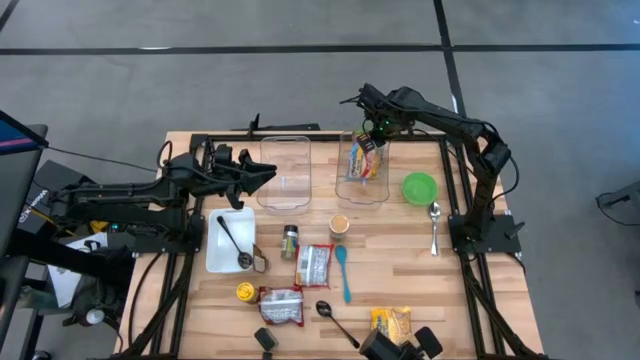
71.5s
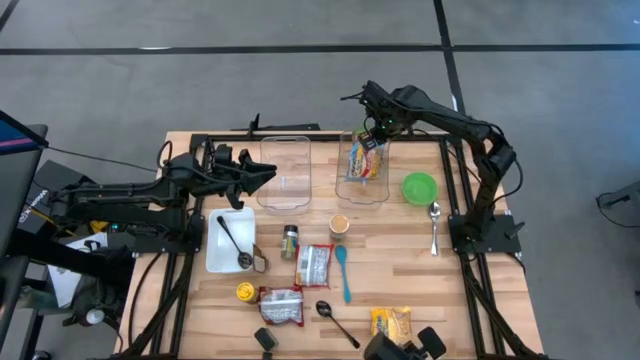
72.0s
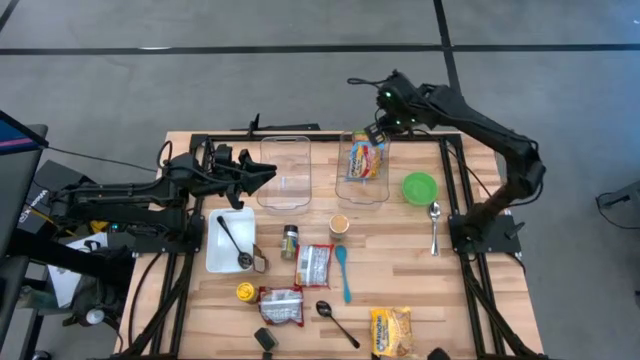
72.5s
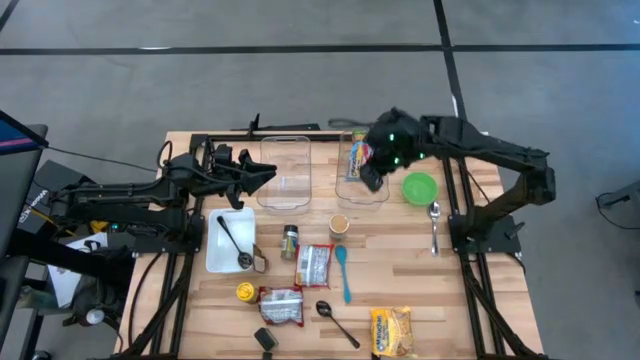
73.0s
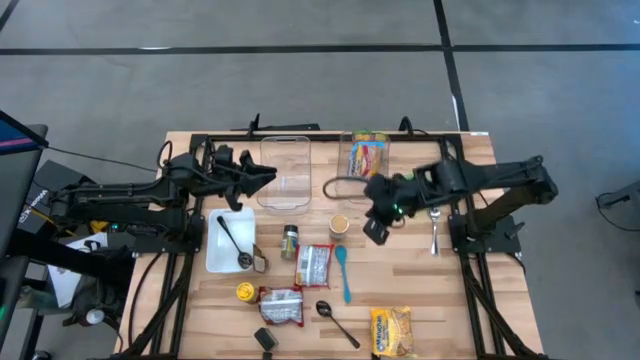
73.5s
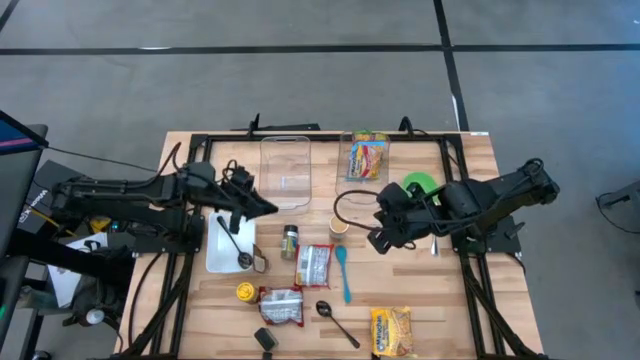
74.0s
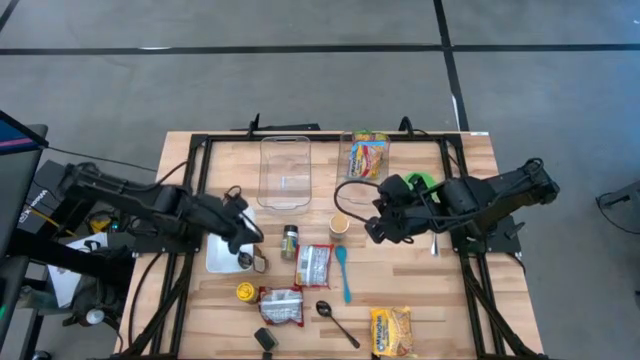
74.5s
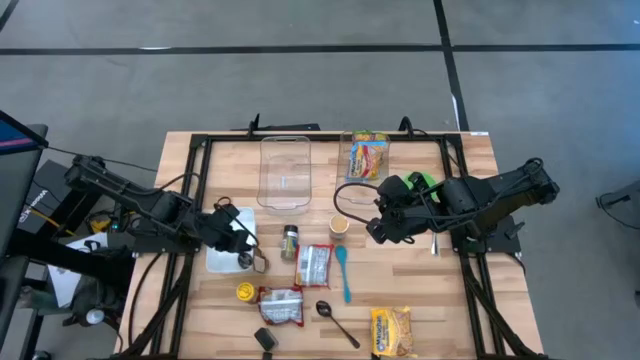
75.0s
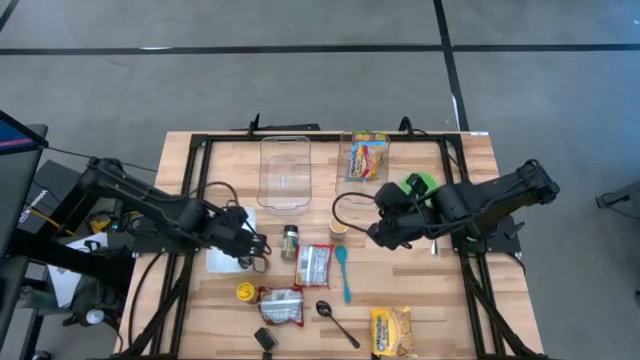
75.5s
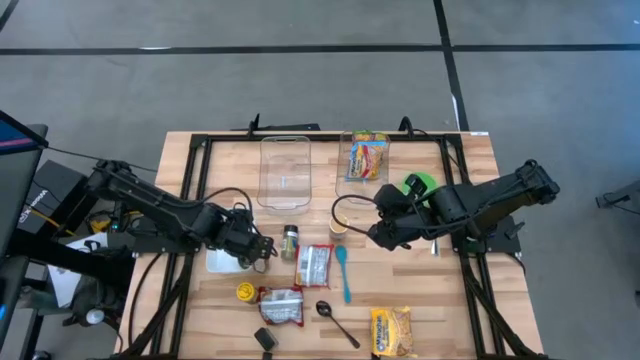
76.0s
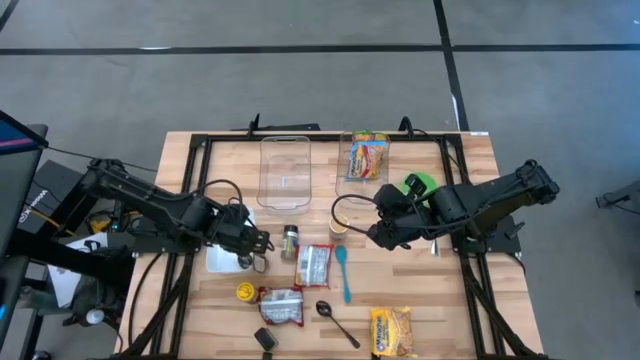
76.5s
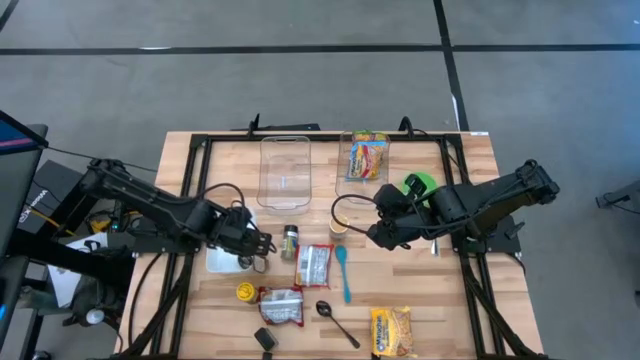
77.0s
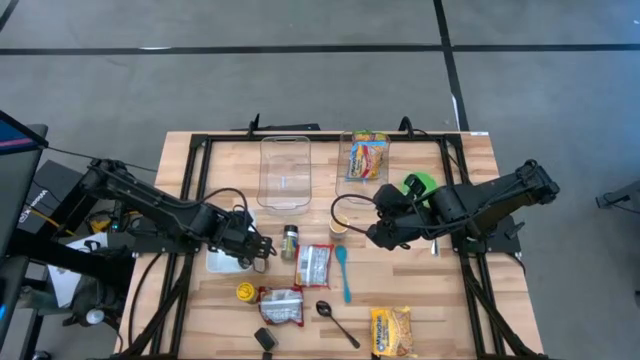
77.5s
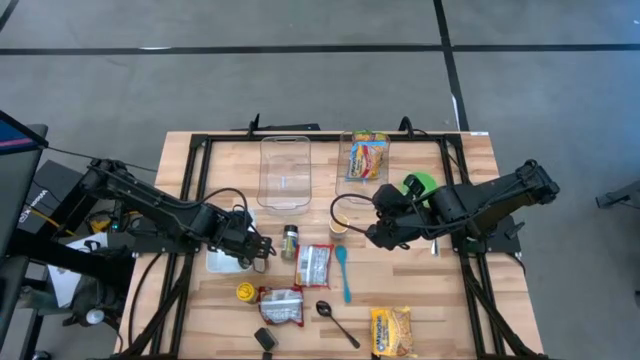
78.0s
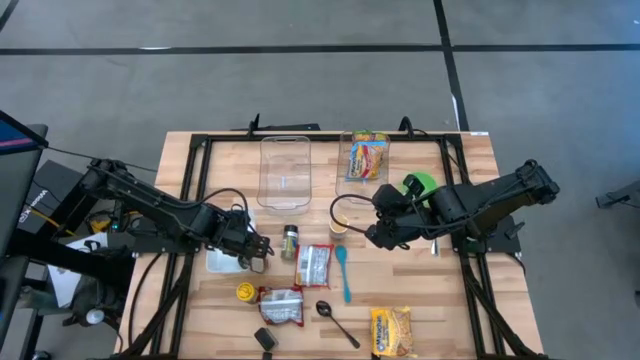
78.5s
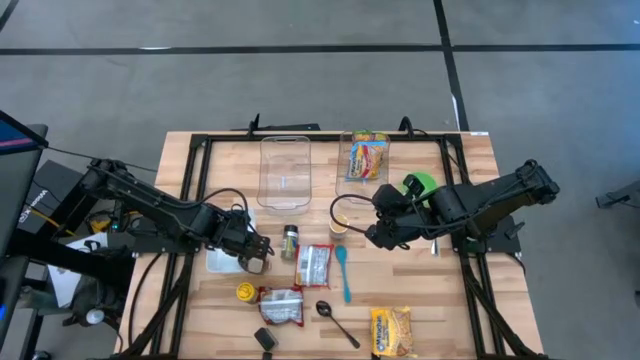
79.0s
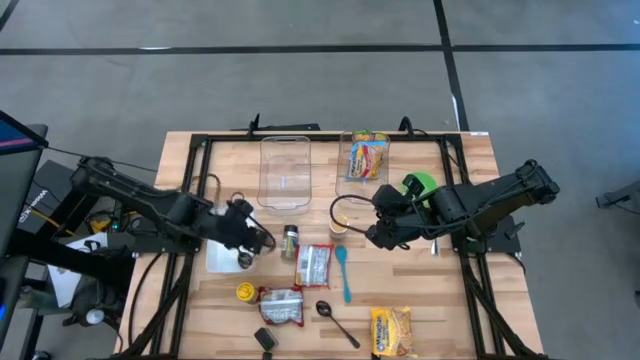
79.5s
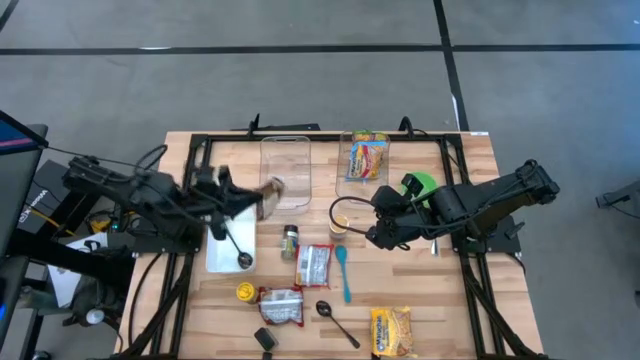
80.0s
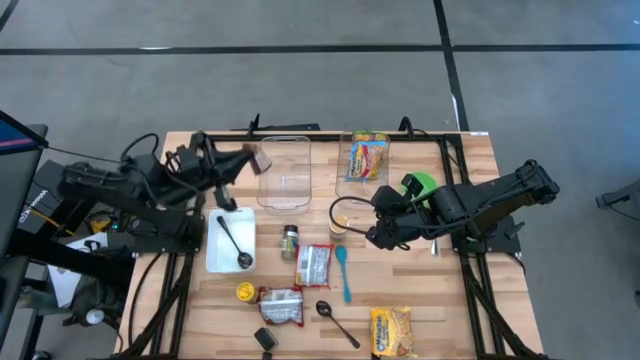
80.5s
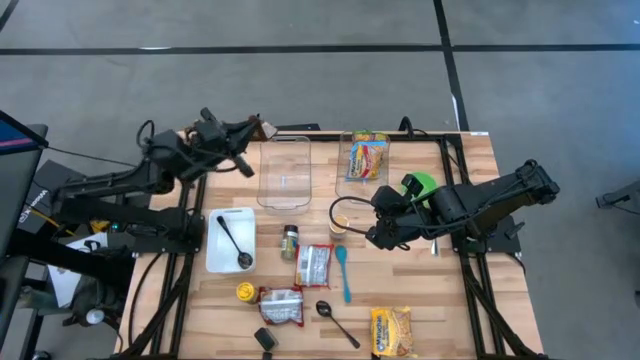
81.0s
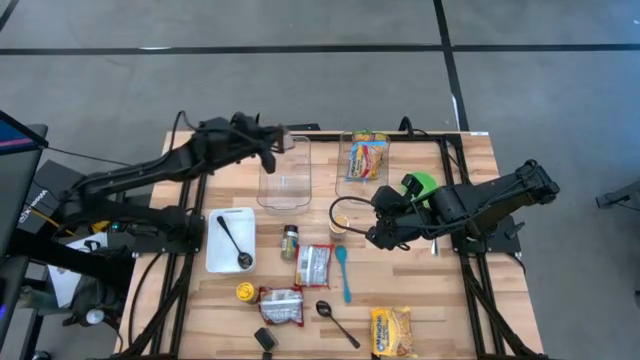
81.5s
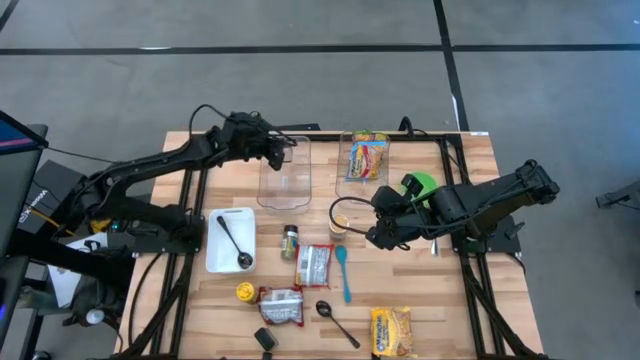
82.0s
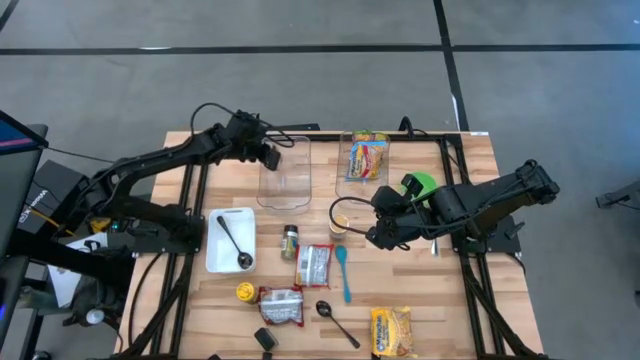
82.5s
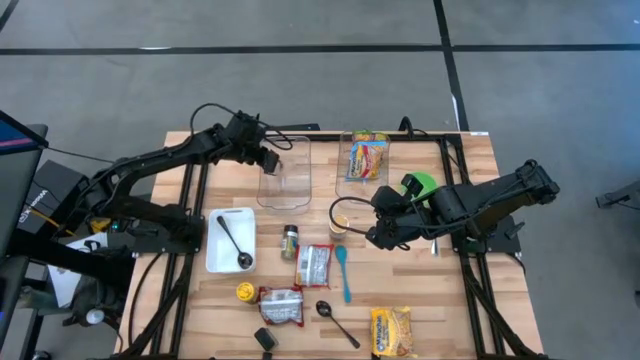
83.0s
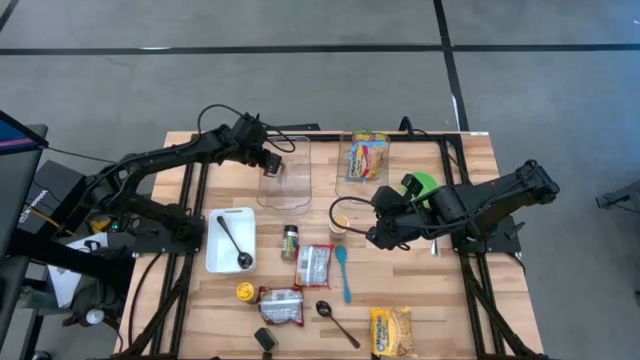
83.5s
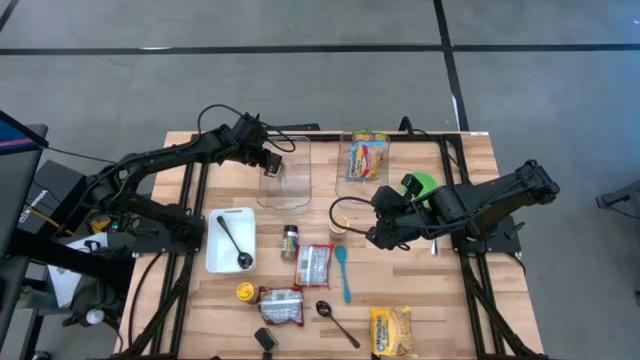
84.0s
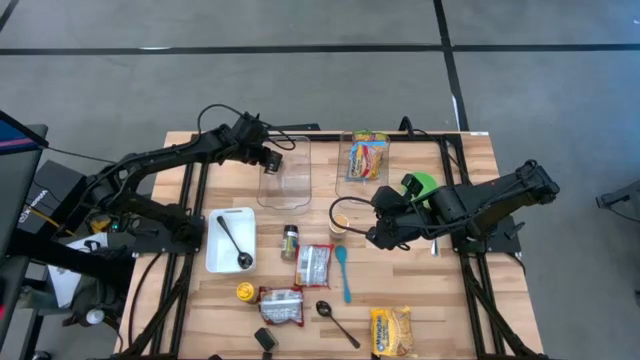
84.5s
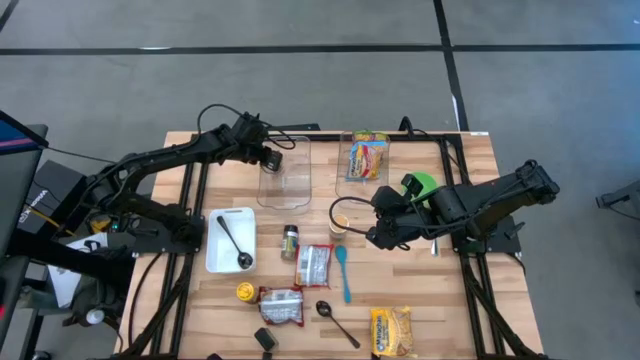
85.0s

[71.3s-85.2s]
Task: Pick & Place Food Item
Put the orange seasoning pack into the left transparent bin

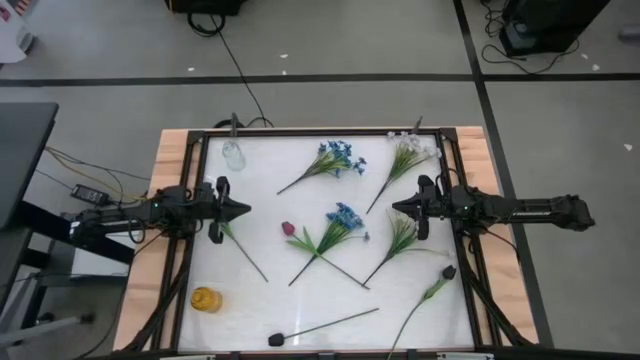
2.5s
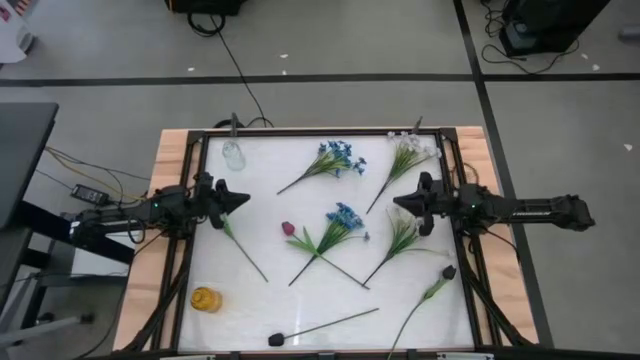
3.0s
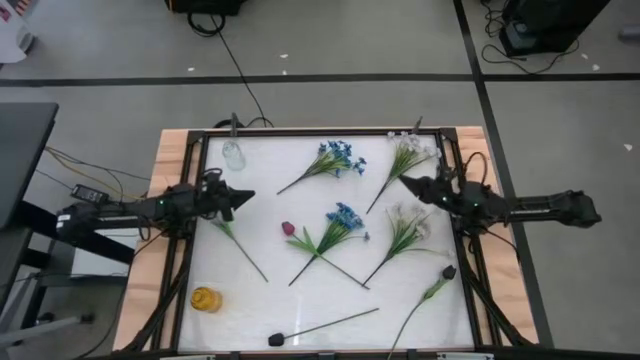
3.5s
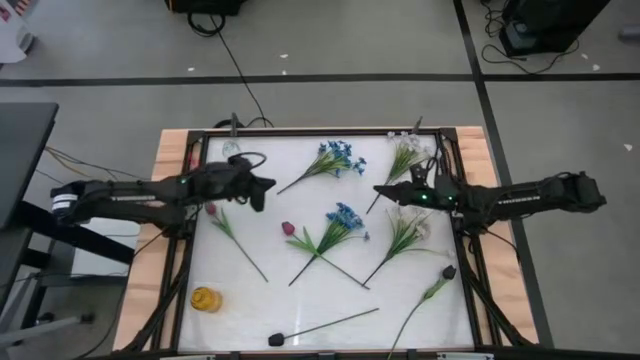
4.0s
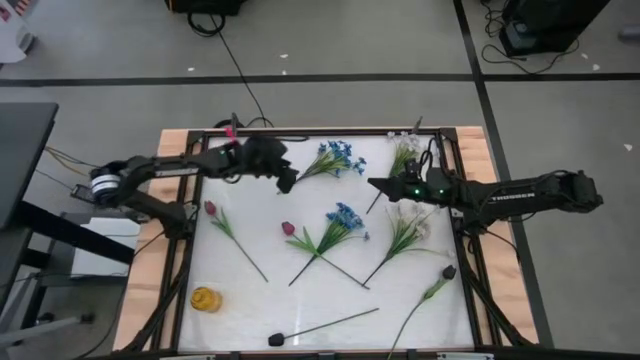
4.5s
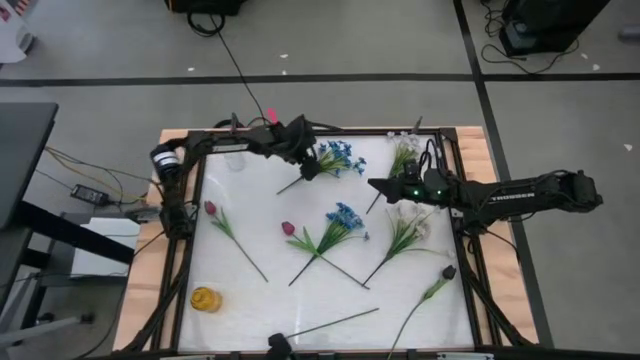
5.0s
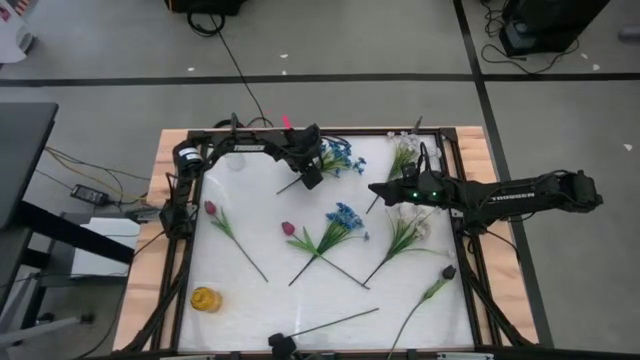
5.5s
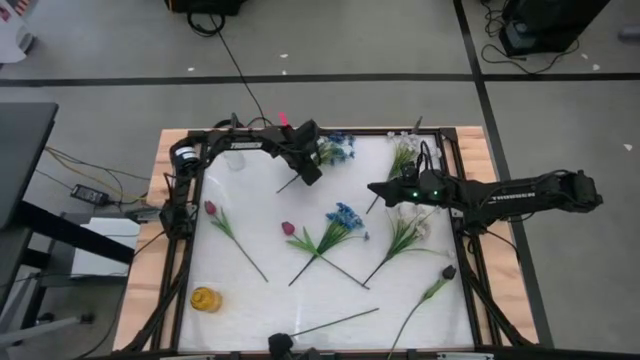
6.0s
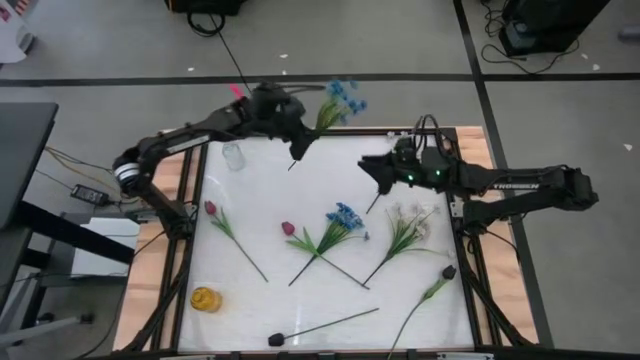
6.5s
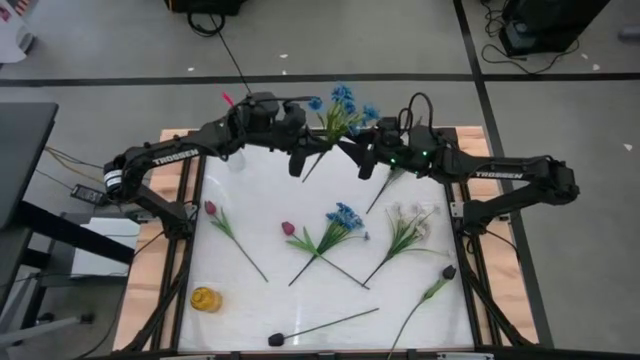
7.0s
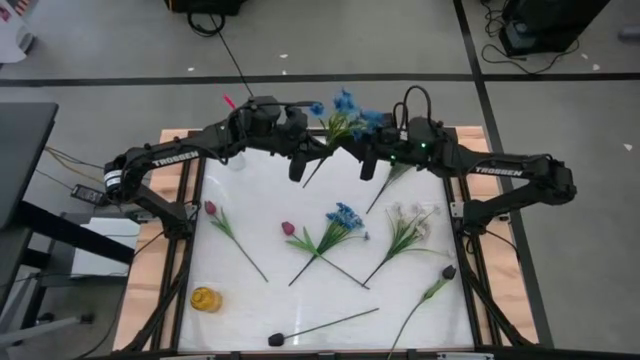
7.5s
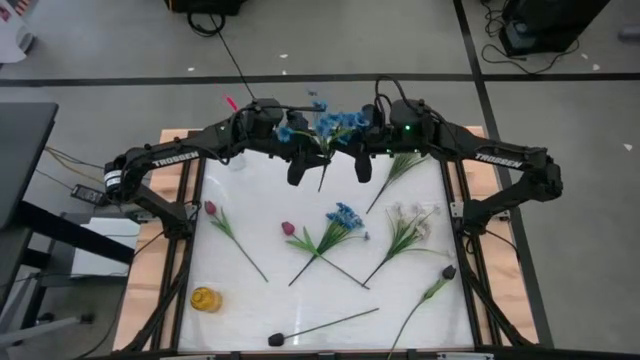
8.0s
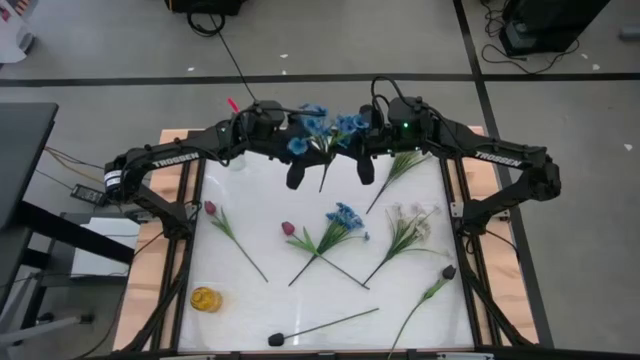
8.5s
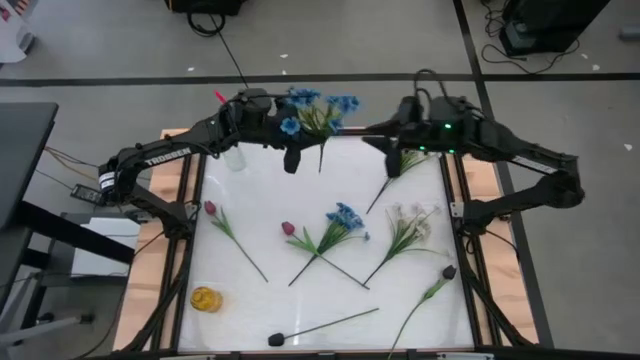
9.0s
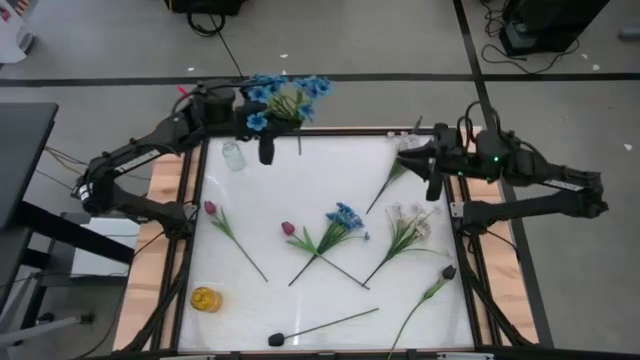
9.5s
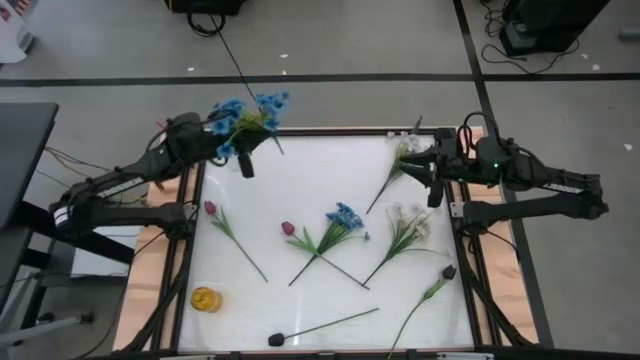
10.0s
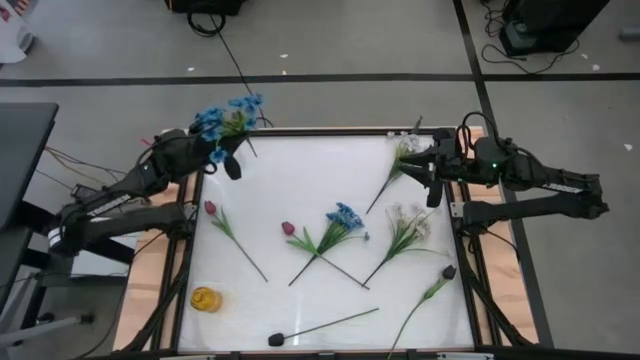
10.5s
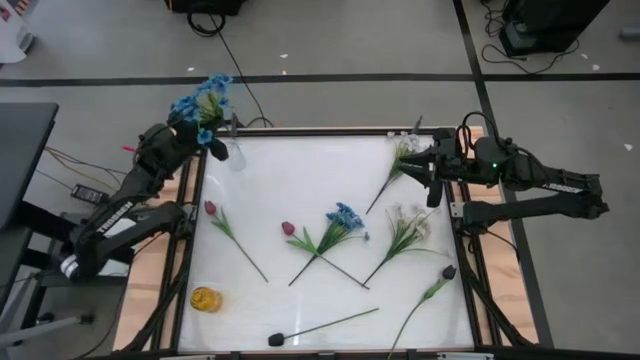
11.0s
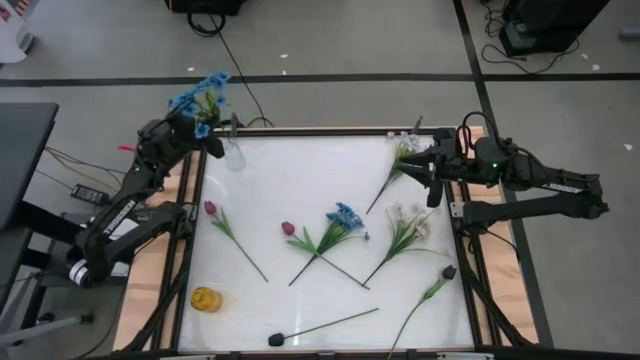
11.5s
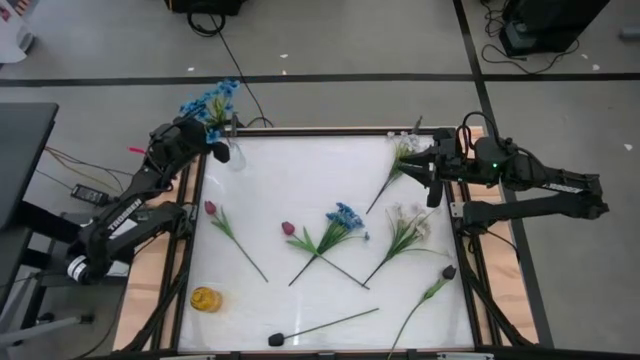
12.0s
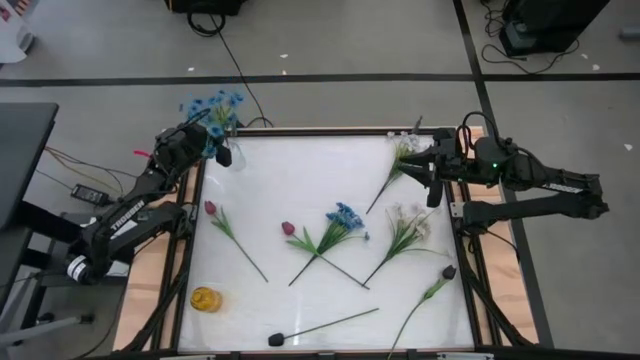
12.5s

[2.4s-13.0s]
Task: Sort flowers into vase by color
Put the top blue flowers into the transparent vase
